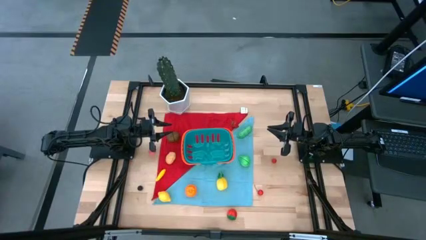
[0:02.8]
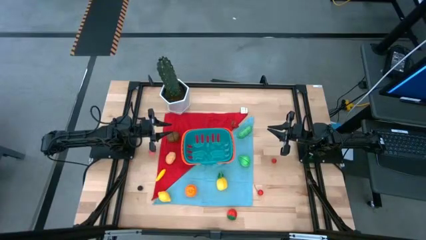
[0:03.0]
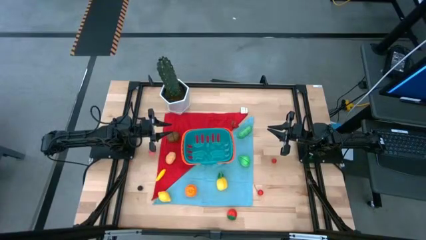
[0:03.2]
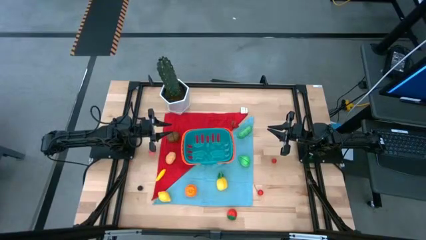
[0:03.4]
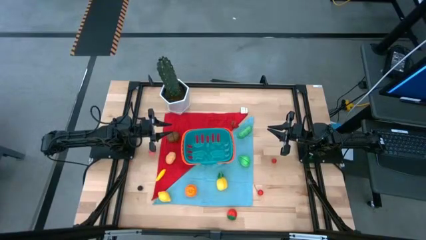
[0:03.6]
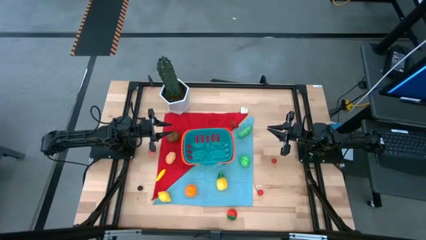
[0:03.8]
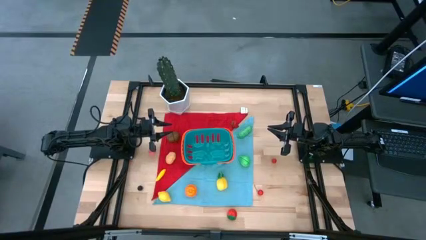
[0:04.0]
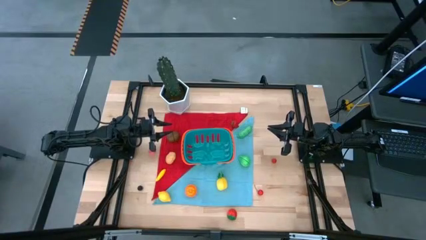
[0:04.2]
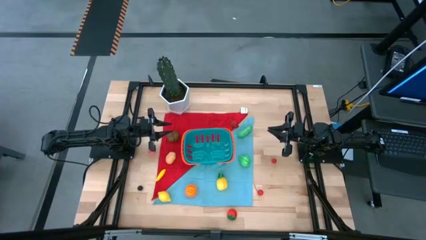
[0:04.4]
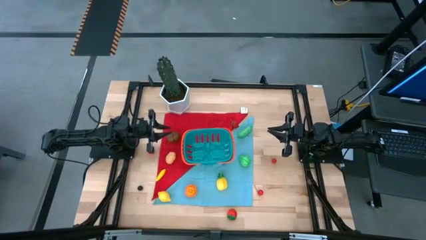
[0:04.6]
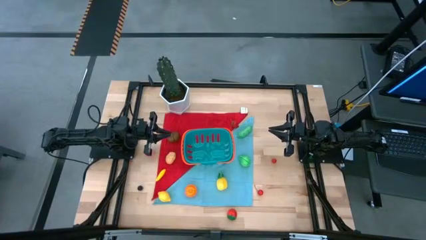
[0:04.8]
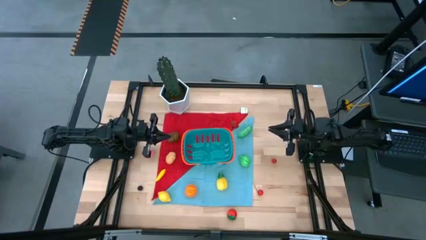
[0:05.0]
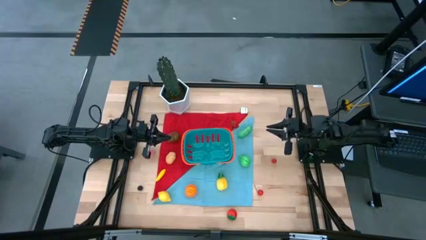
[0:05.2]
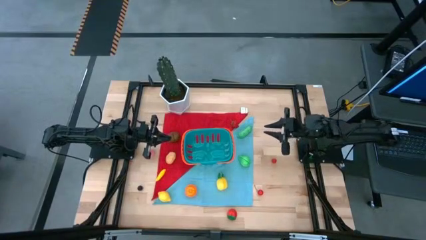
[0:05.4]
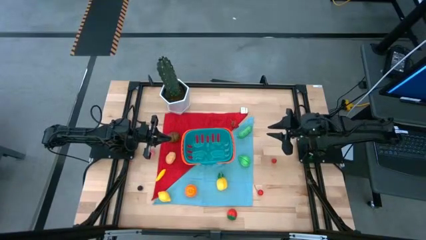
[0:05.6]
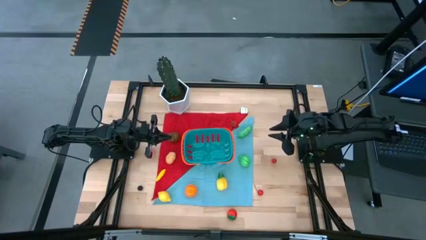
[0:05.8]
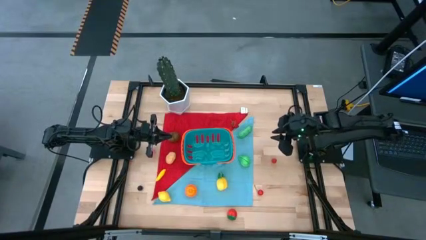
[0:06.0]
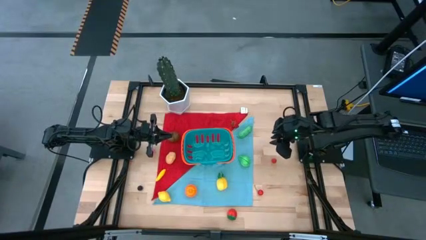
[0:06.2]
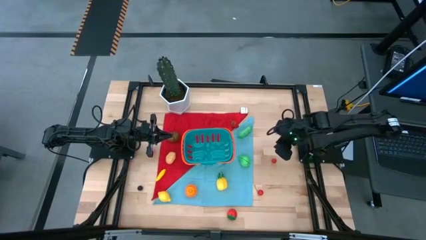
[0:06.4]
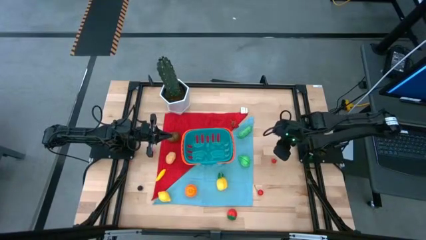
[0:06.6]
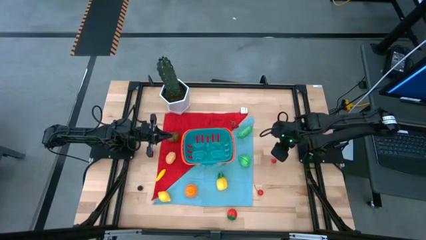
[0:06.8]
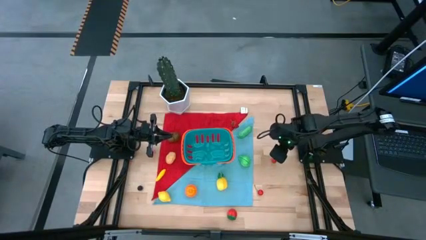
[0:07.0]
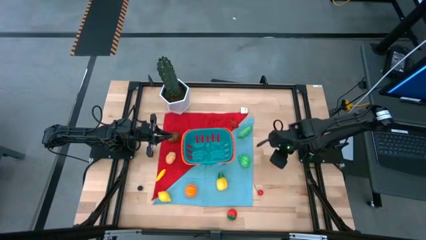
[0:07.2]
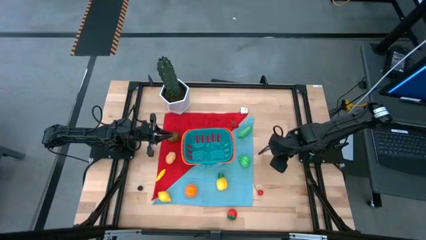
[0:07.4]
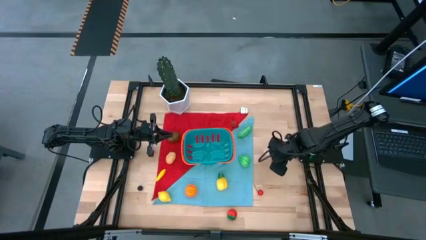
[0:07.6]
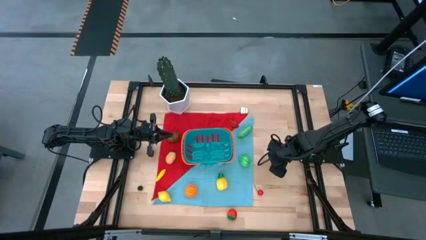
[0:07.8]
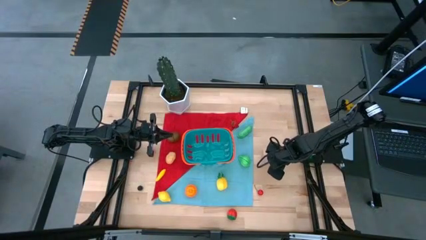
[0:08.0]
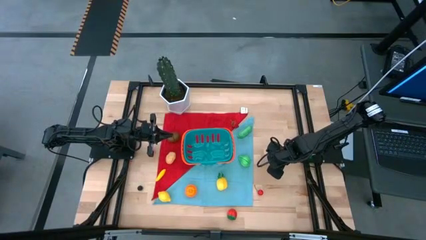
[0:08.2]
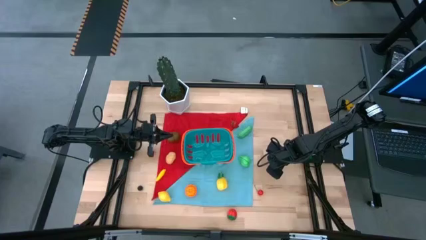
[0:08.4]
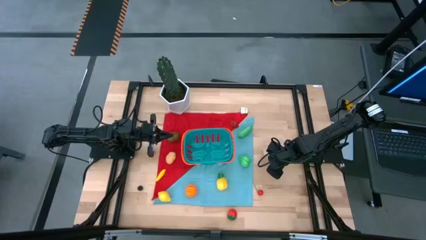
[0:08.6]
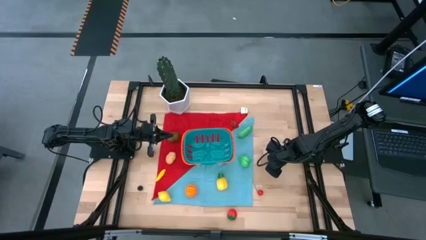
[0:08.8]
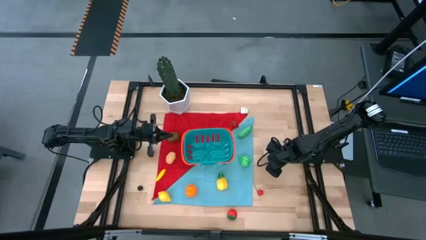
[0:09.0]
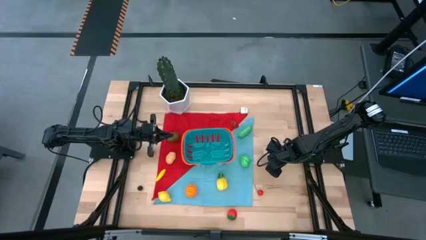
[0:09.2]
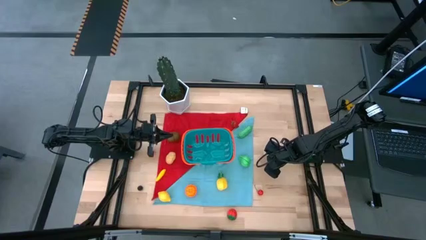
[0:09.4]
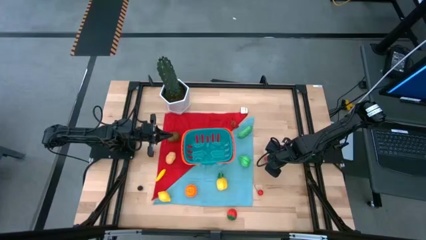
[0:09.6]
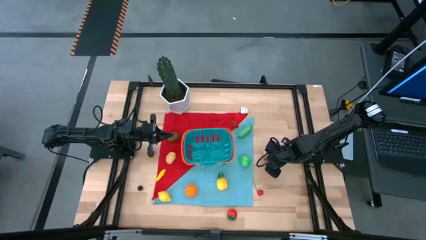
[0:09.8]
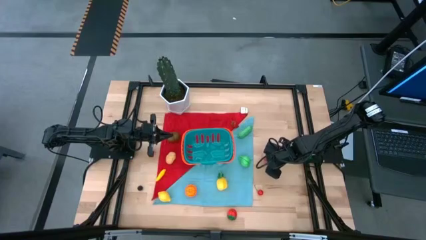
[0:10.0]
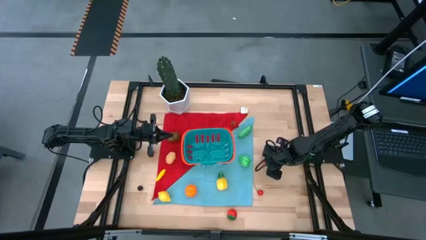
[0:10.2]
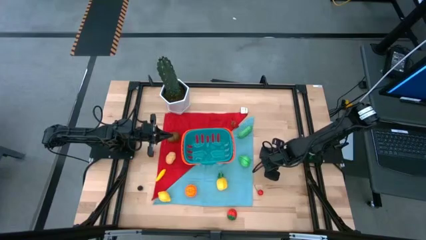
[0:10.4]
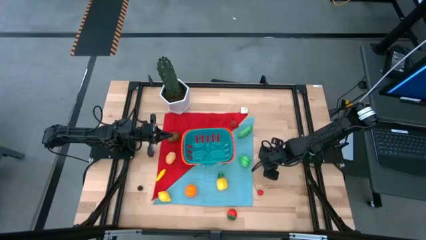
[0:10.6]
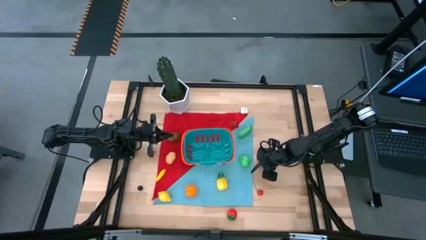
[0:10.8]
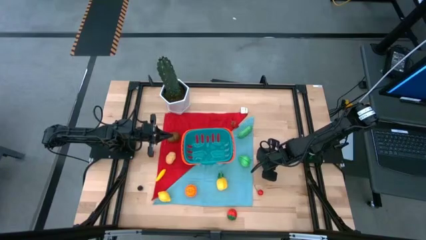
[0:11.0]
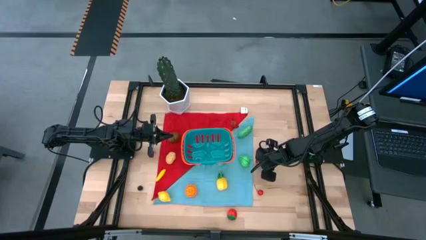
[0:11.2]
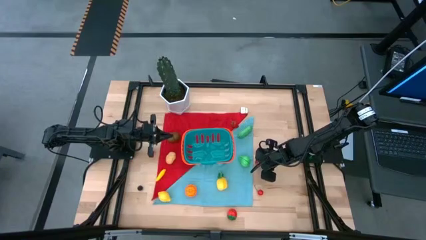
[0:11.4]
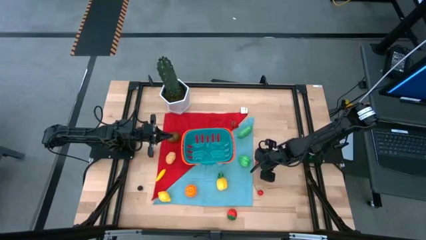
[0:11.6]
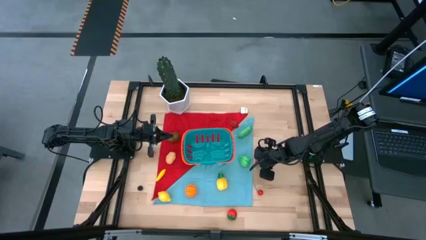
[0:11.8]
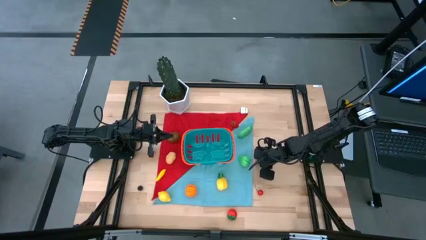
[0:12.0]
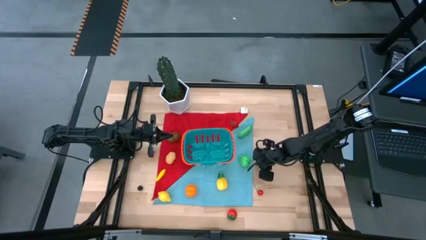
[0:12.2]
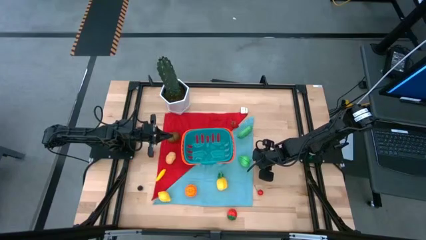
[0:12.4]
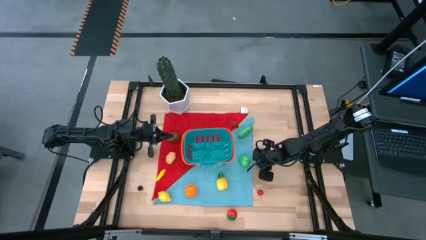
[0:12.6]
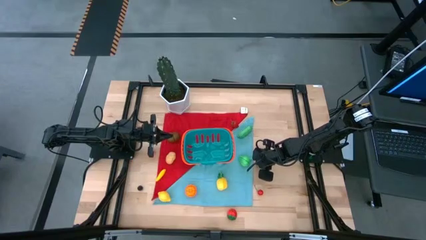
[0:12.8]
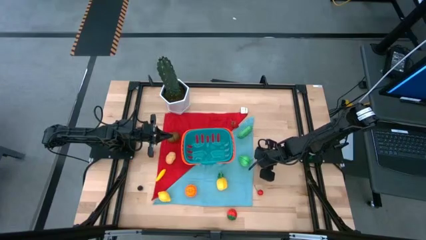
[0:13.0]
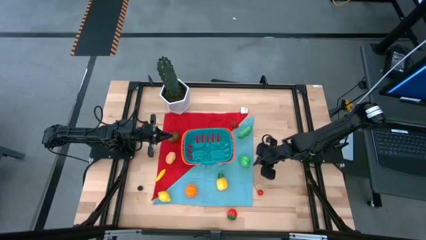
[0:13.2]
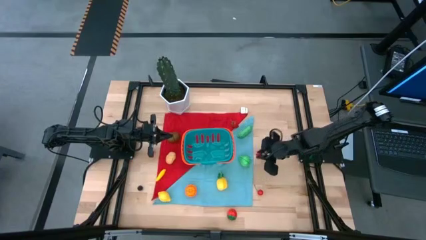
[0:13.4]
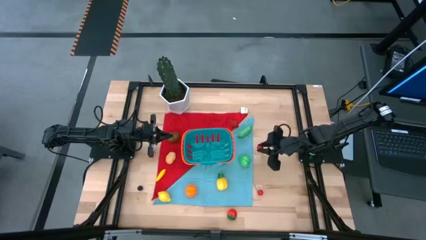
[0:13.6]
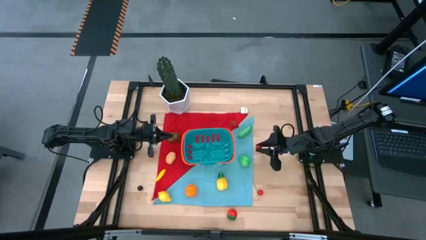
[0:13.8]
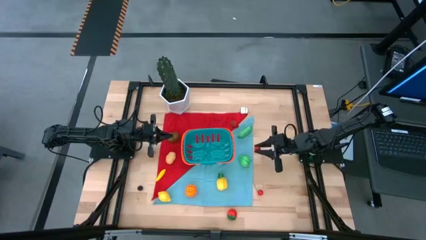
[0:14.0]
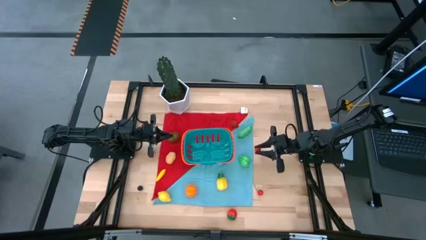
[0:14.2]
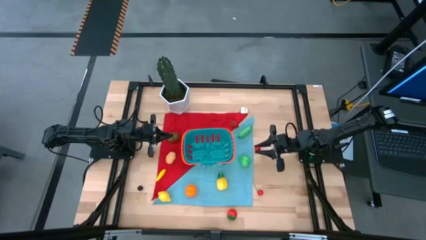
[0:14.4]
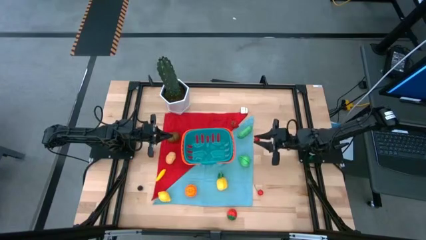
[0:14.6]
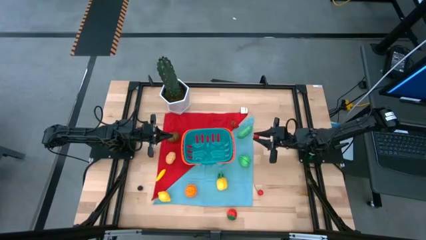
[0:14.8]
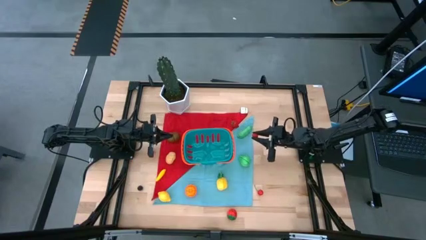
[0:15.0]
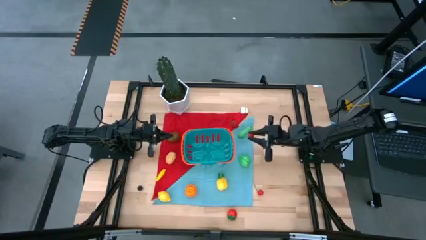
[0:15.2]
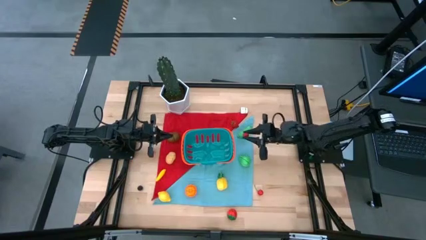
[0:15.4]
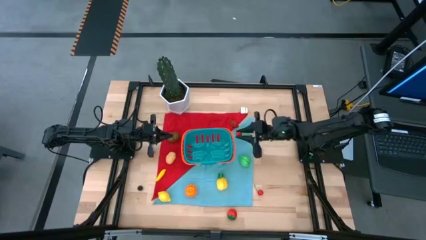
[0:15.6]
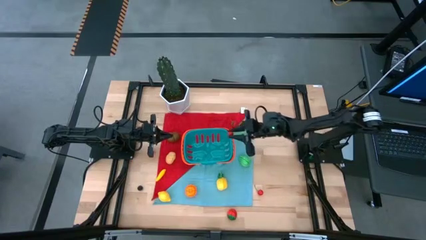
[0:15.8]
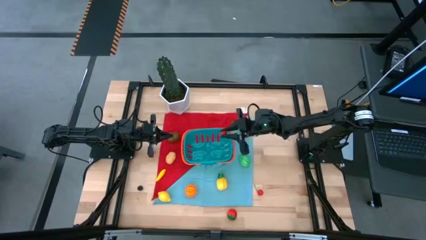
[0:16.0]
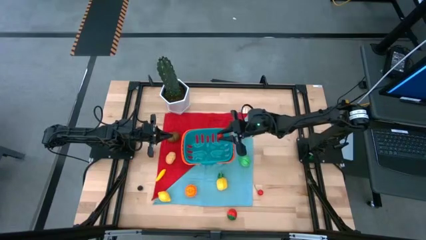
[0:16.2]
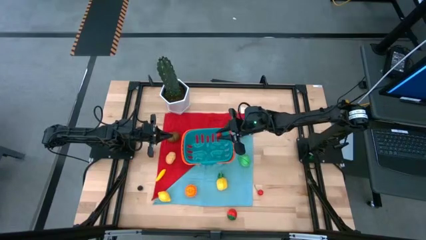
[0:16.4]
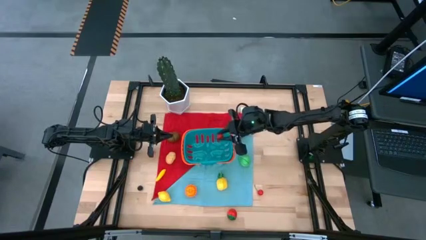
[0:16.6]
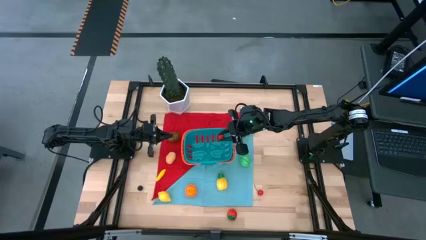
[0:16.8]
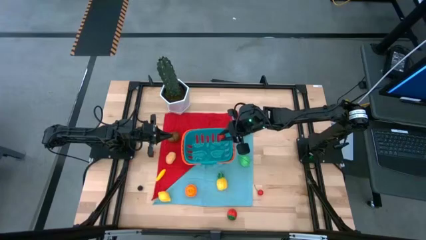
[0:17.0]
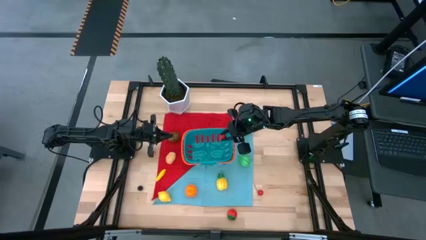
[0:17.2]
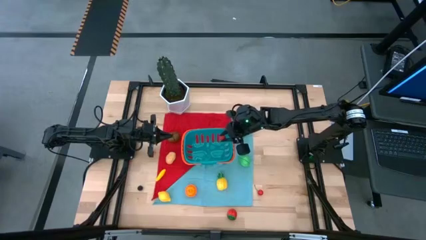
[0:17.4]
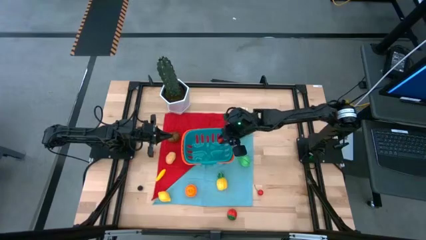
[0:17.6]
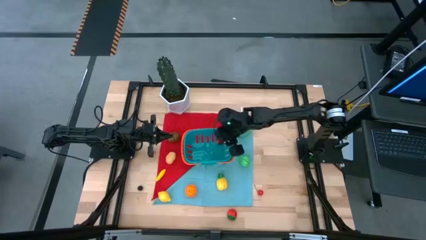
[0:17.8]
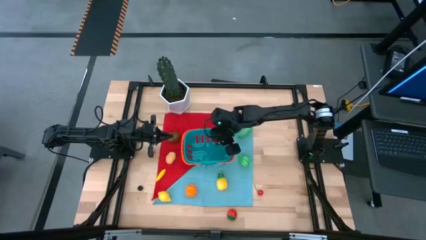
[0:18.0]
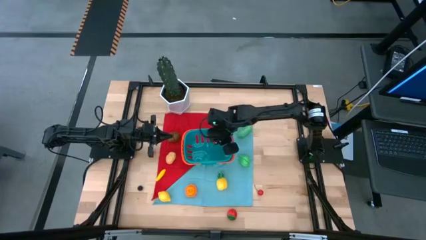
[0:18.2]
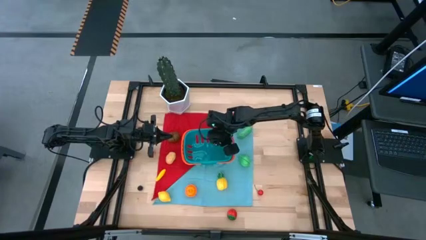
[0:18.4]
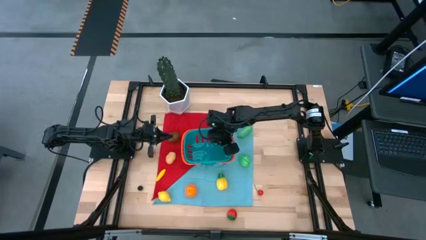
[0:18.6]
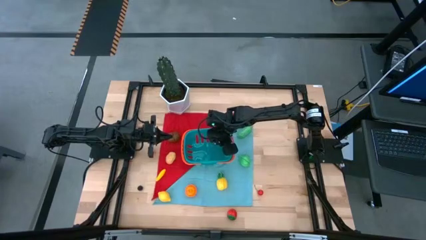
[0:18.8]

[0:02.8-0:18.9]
Task: Build produce basket
Put the red raspberry into the blue basket
